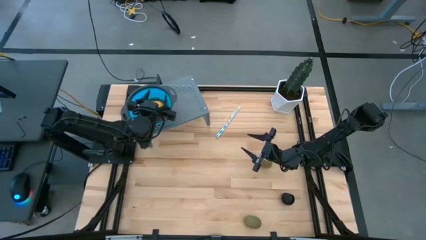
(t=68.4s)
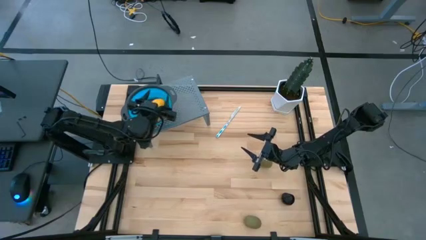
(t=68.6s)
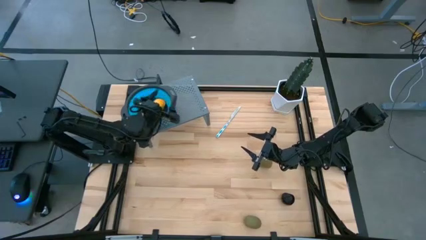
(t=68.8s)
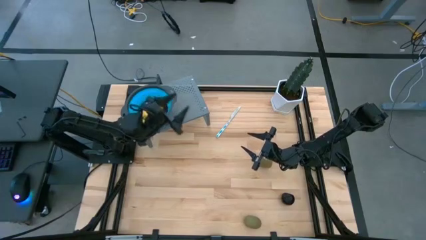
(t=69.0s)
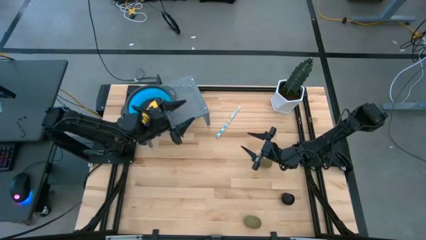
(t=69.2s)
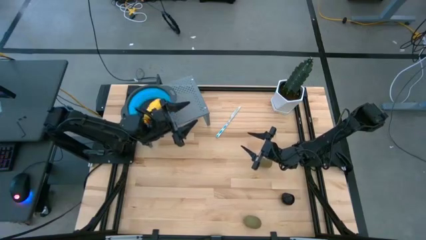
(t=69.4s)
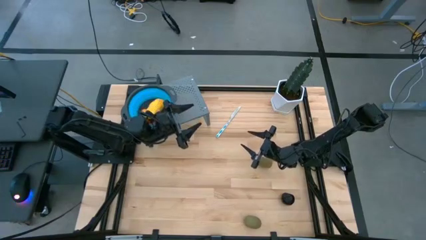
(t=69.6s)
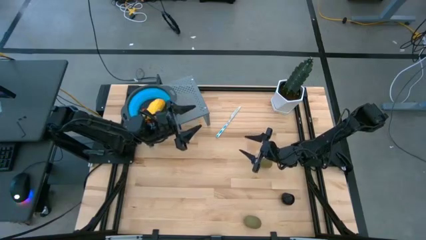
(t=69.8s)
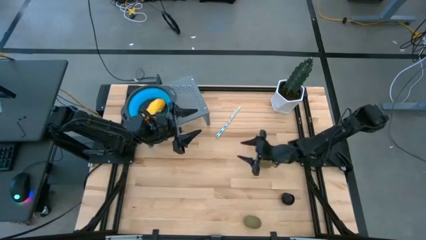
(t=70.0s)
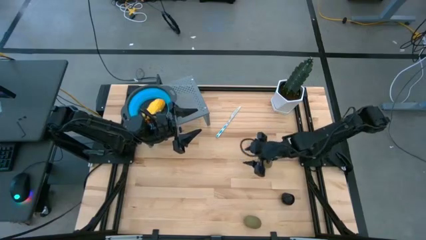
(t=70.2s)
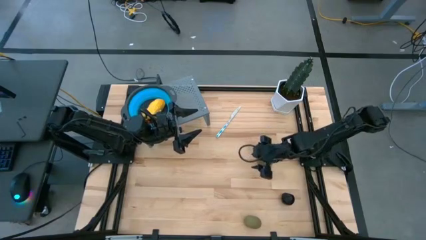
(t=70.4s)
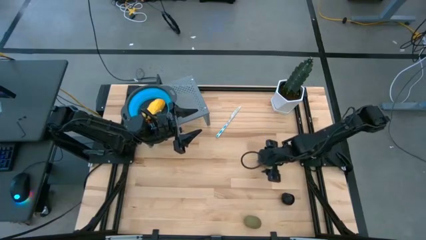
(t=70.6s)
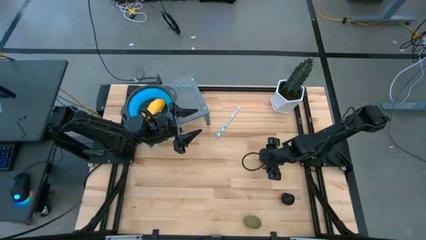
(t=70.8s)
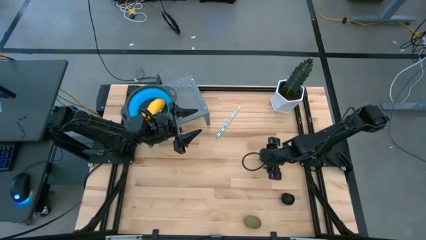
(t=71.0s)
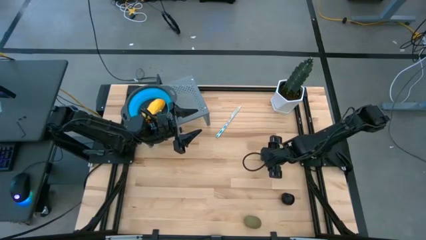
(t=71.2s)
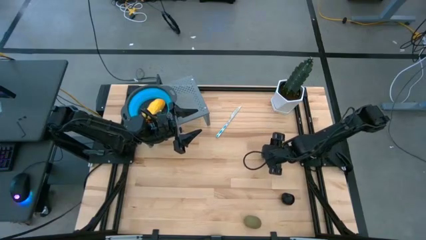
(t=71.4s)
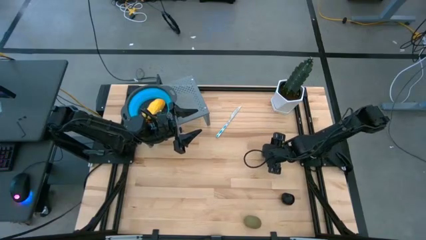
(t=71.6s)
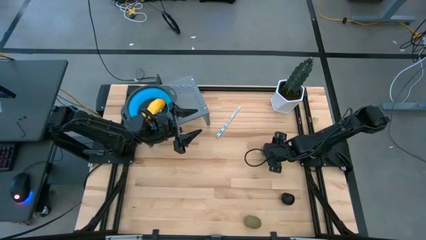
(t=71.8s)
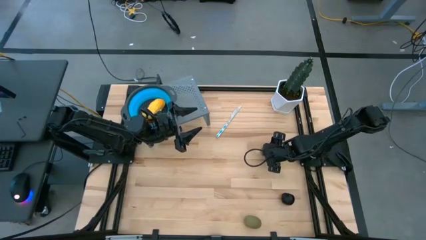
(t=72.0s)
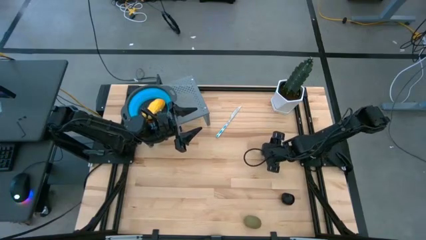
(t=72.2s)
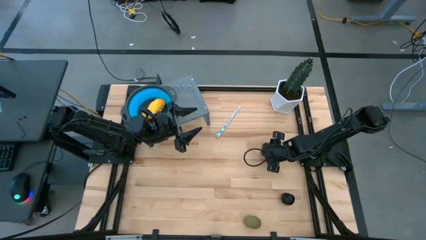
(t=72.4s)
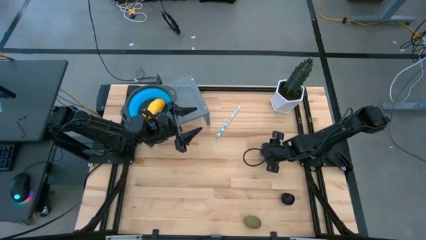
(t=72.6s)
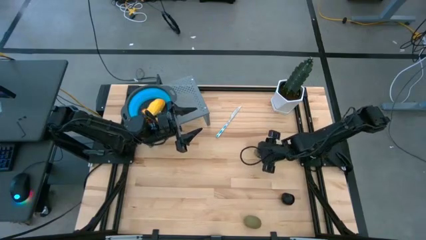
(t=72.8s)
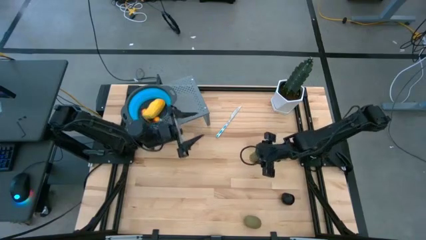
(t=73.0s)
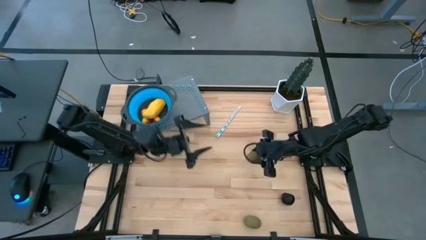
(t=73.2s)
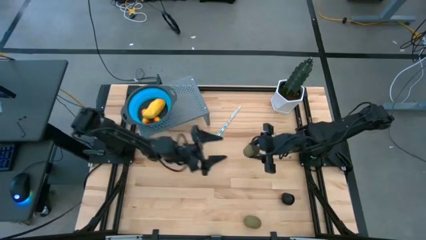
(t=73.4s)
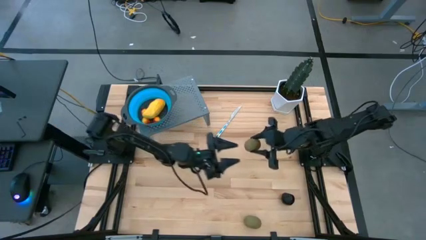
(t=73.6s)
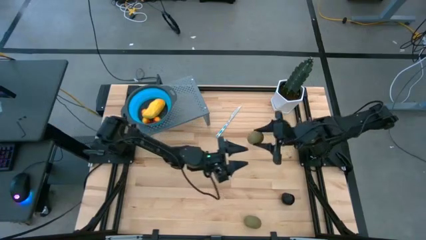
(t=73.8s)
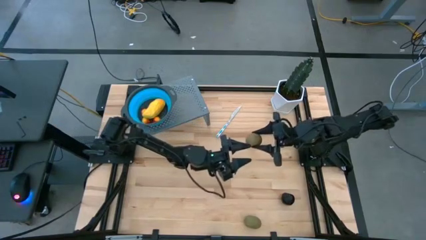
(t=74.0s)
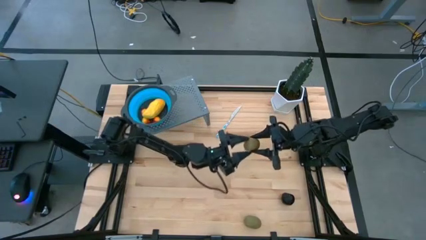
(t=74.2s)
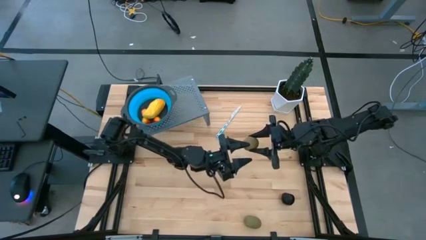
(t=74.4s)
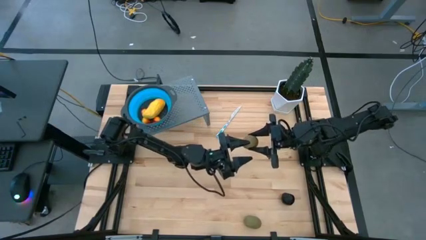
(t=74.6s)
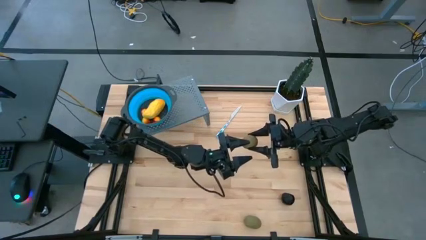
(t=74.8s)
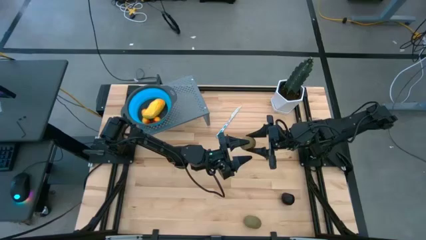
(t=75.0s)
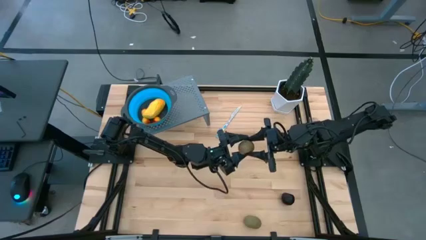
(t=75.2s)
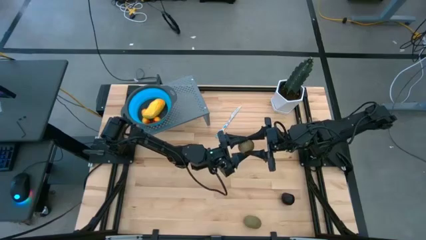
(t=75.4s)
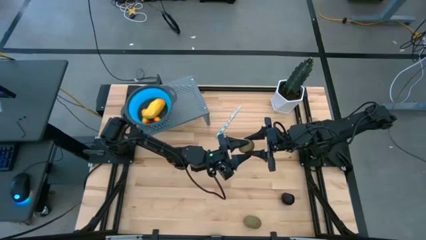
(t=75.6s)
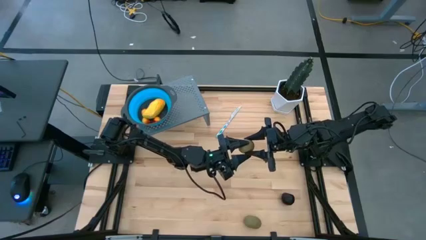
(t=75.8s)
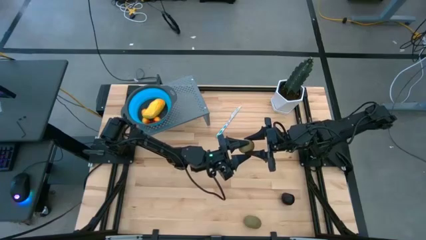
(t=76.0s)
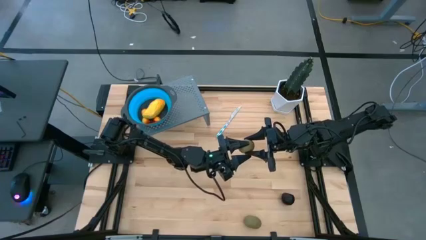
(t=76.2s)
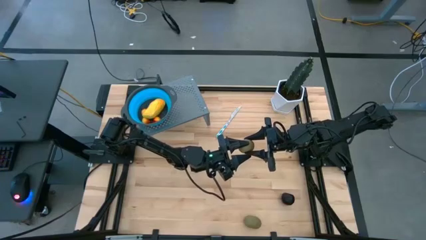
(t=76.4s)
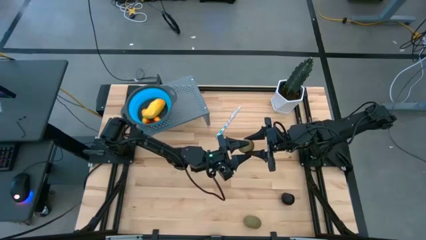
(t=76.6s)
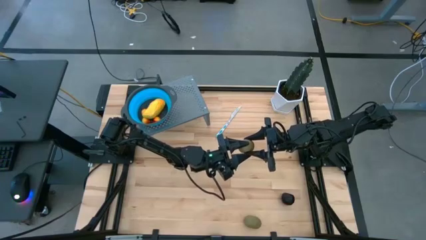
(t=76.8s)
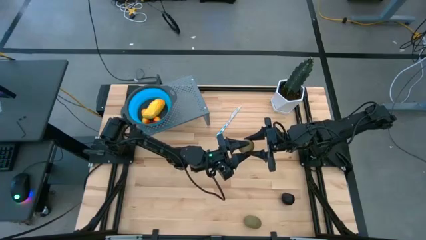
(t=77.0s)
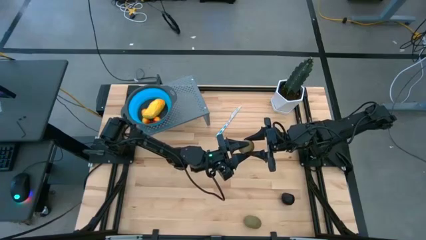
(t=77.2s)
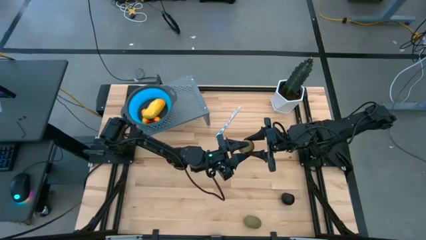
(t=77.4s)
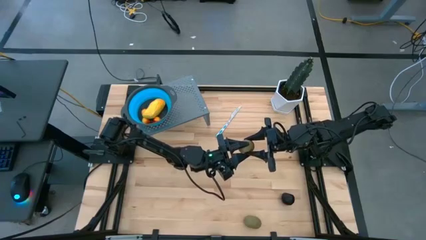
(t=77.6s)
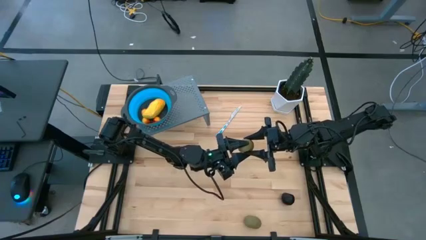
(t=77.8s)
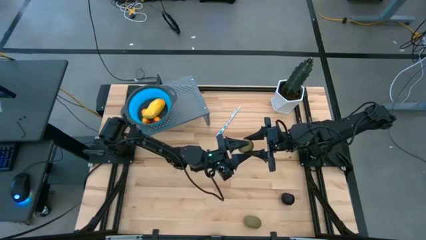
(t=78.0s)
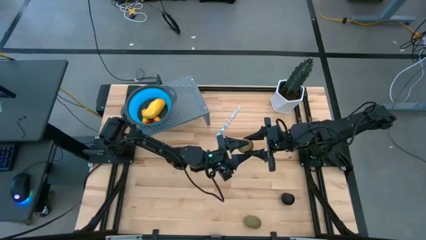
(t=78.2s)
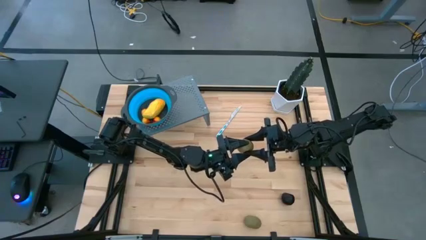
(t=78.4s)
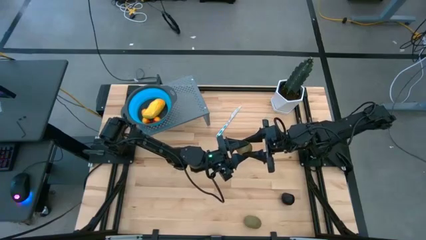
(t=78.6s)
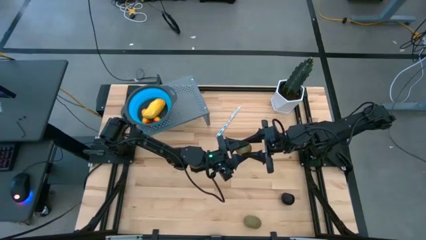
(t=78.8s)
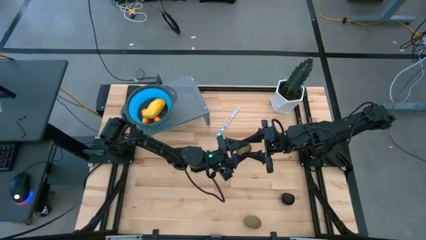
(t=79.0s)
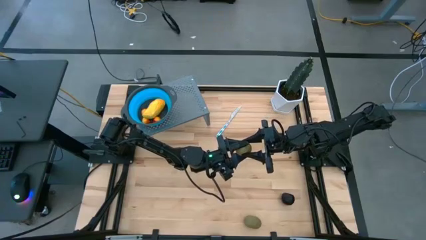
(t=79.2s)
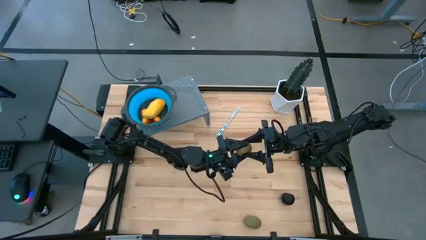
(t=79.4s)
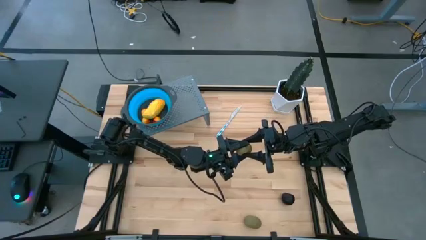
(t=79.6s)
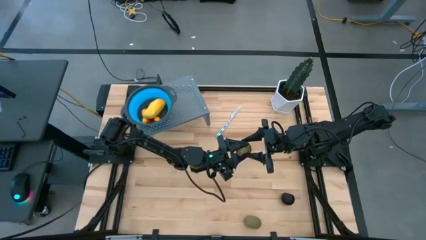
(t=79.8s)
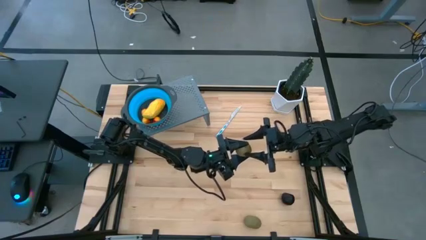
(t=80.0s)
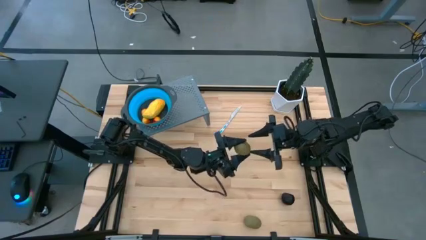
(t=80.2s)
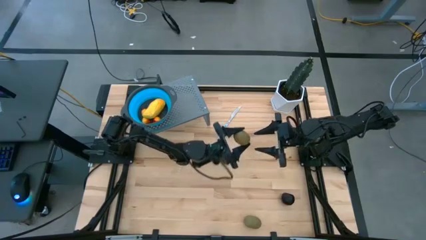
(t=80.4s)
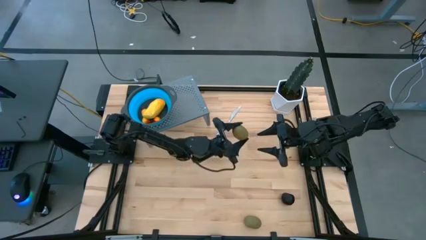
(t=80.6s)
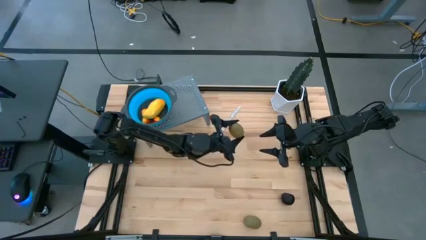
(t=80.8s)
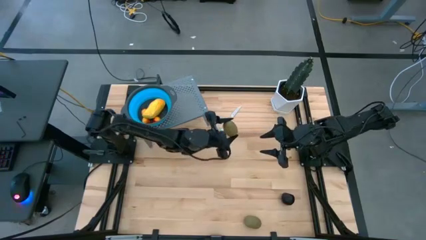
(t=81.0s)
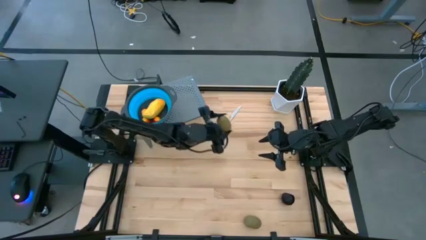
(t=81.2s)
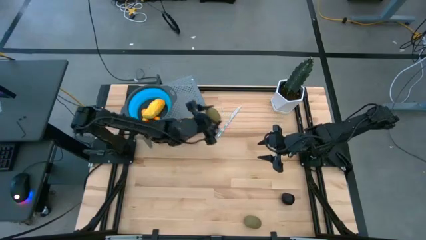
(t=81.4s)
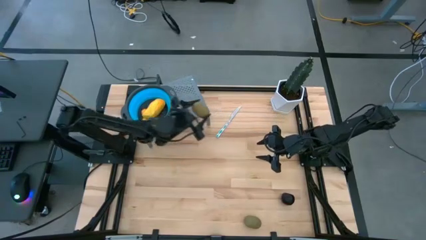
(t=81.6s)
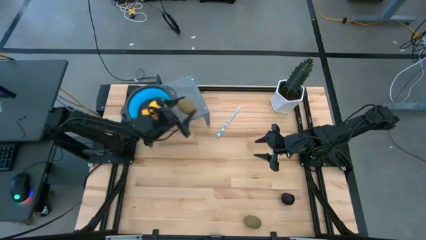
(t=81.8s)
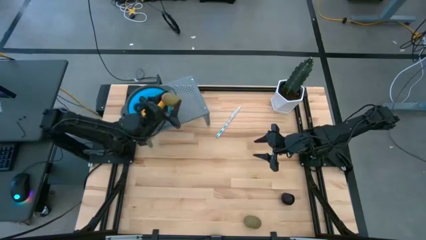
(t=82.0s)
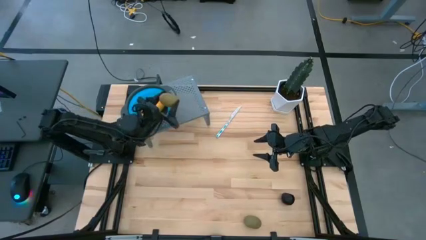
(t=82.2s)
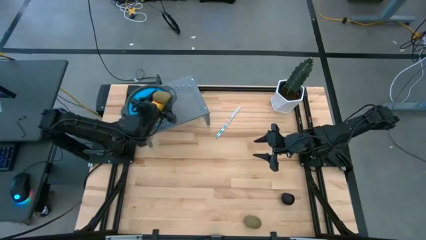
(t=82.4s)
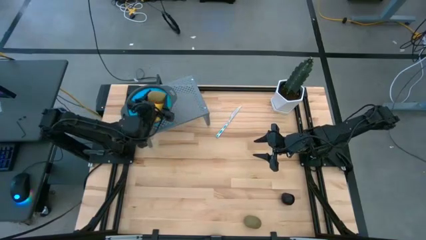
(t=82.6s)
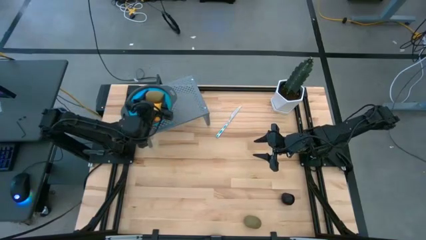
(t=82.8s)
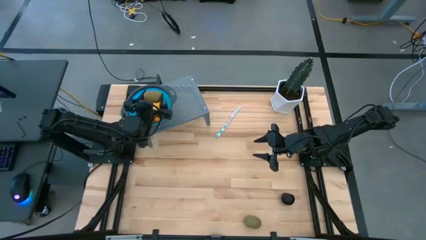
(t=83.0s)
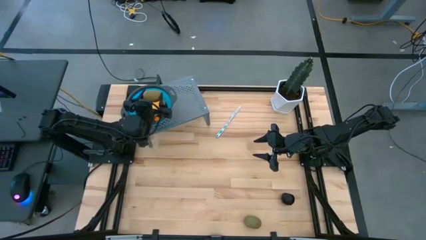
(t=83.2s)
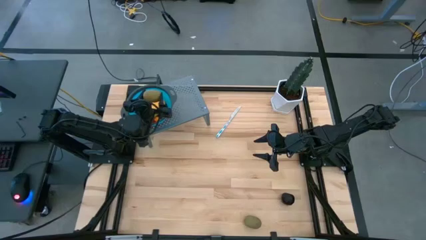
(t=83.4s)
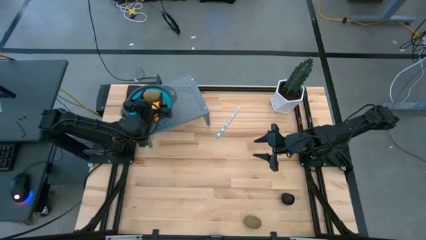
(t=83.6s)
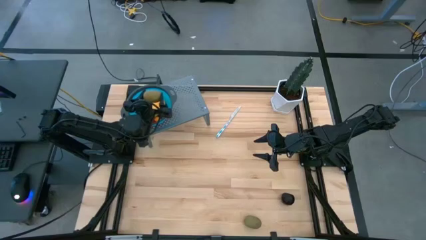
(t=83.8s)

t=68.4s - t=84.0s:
Task: Pick & Place Fruit
Put the top brown kiwi into the blue strainer bowl

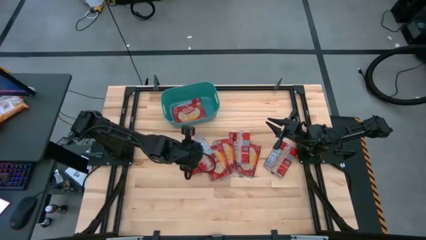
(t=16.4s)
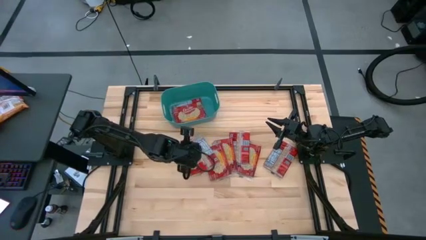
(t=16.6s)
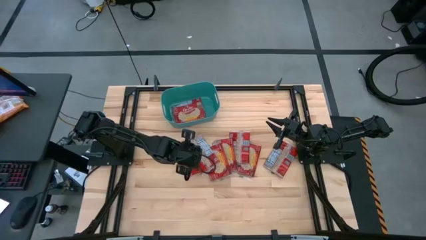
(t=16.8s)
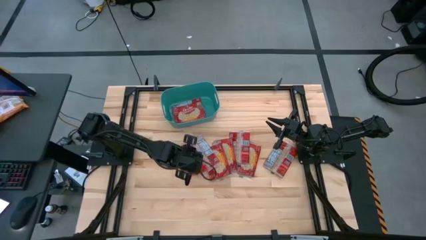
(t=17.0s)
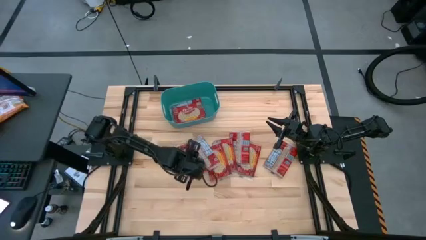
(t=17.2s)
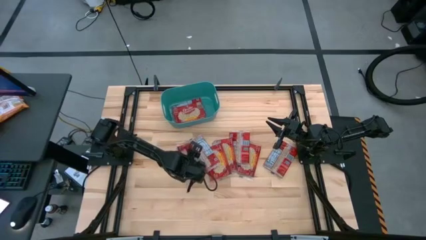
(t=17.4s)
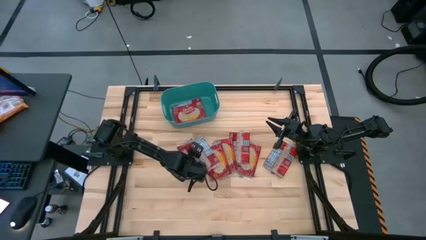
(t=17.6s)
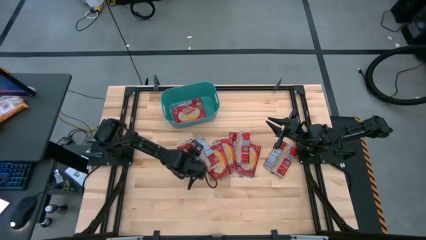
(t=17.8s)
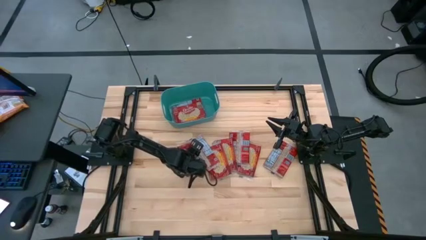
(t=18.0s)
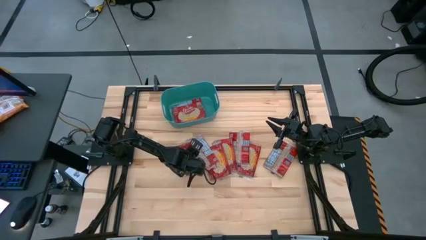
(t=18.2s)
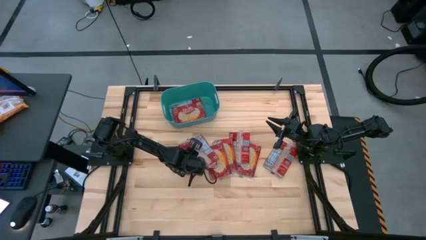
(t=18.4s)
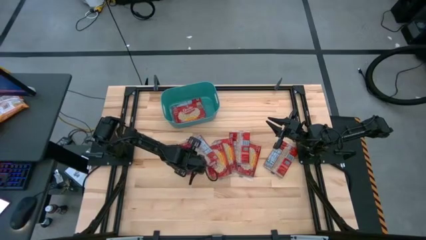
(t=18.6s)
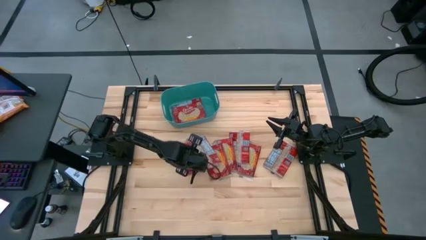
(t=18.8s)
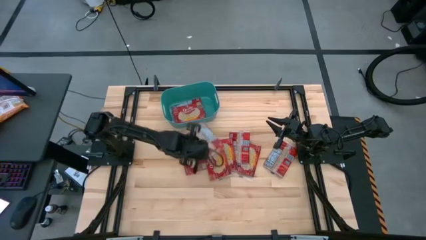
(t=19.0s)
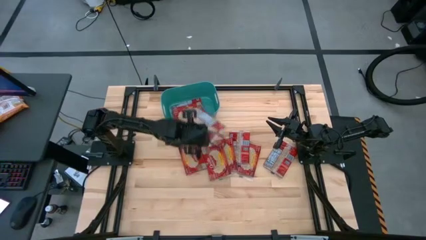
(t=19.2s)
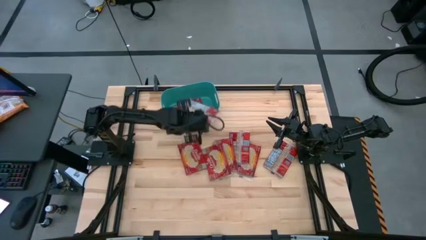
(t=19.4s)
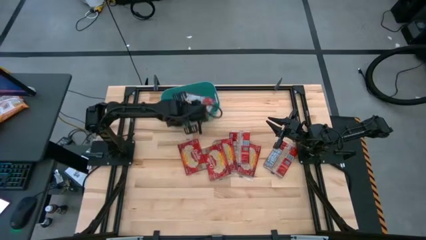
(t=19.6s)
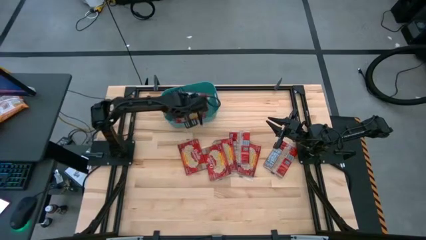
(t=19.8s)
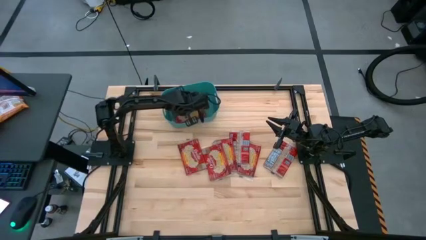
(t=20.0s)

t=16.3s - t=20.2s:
Task: Sort popcorn bags into baskets
Stack the popcorn bag into the green bin
